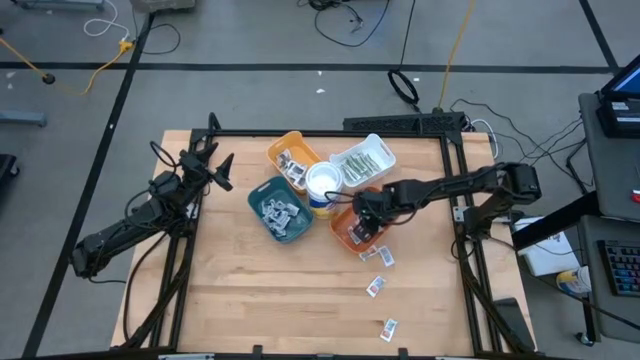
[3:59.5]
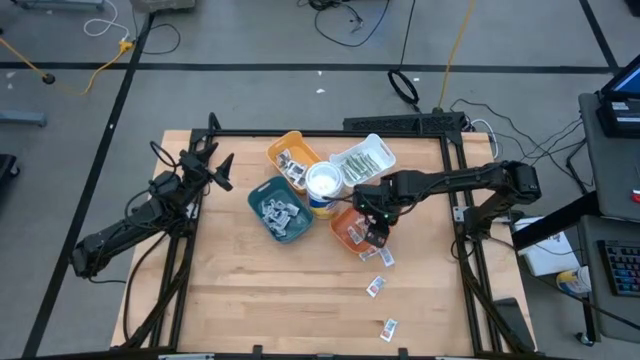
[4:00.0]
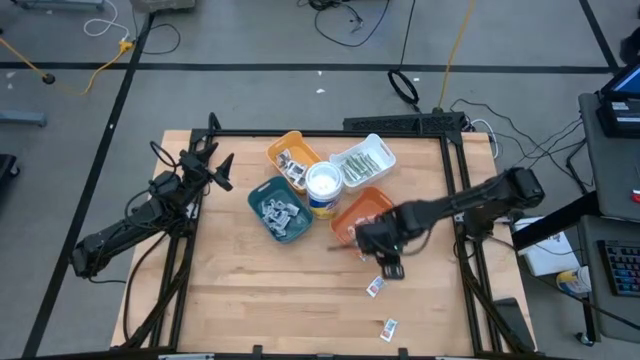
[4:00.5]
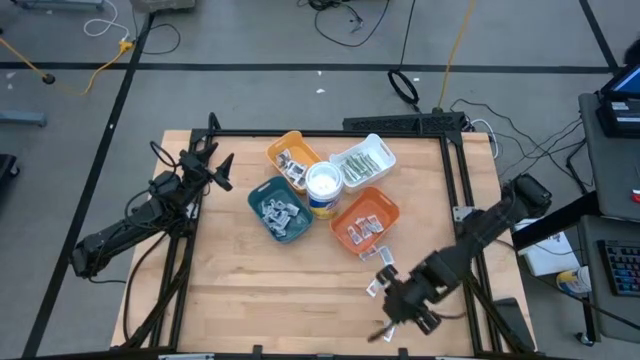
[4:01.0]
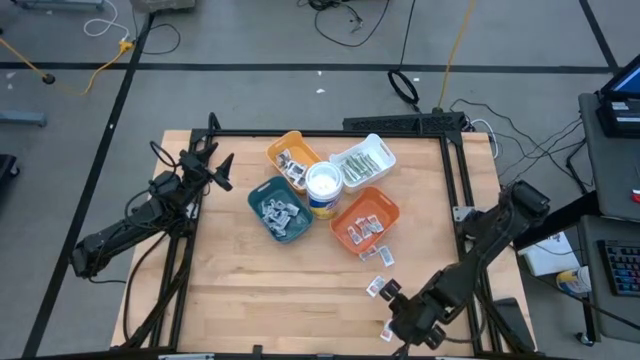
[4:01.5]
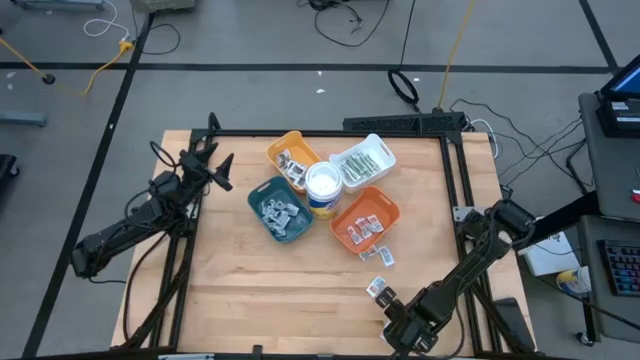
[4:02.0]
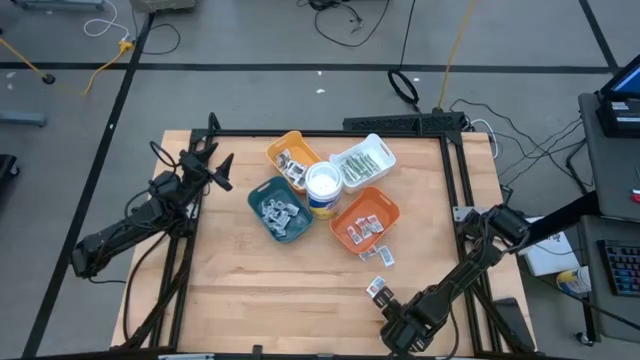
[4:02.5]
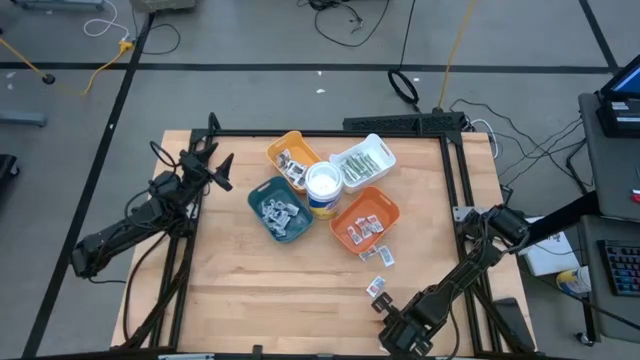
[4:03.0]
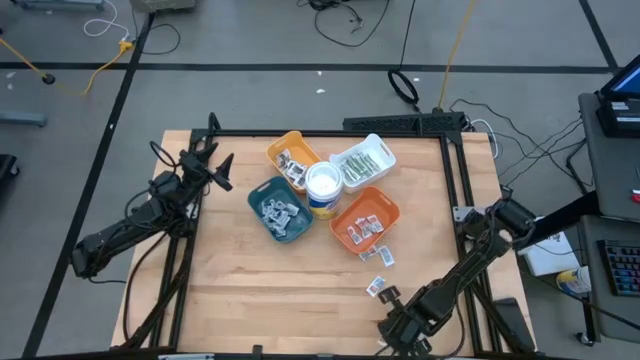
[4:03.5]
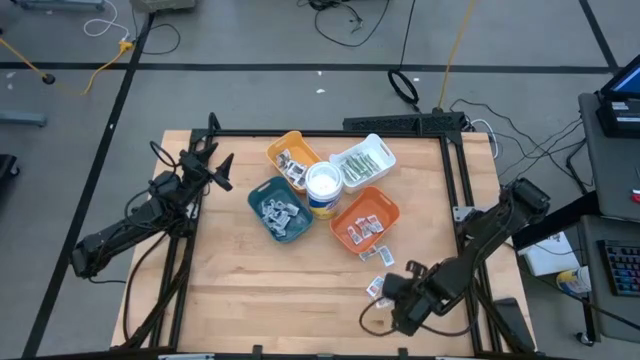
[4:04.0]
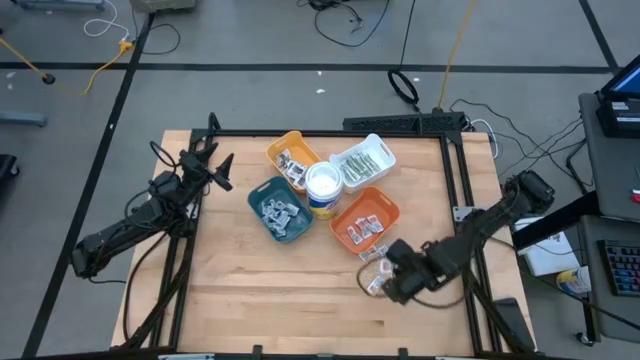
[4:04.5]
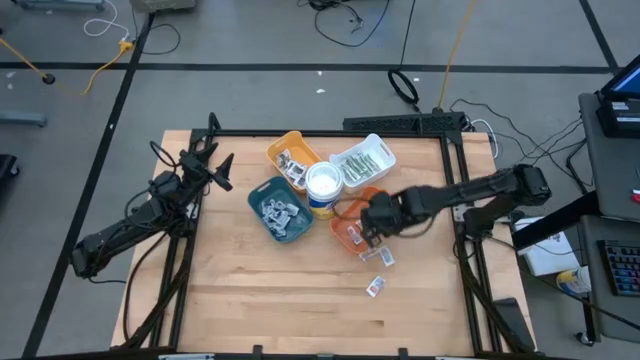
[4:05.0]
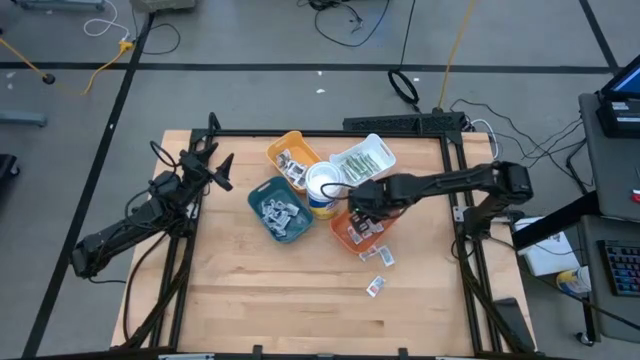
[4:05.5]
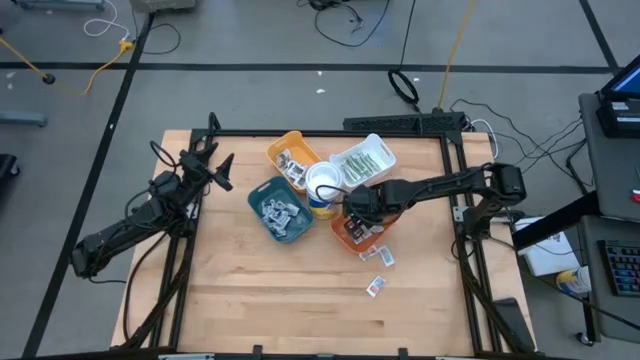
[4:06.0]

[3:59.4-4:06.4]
Task: Pick & Place First Aid Supplies
Put the orange pad into the orange bin

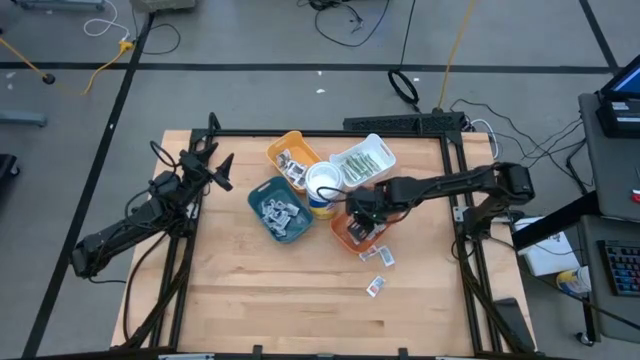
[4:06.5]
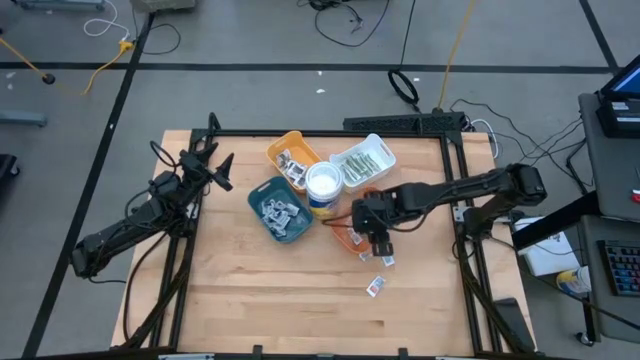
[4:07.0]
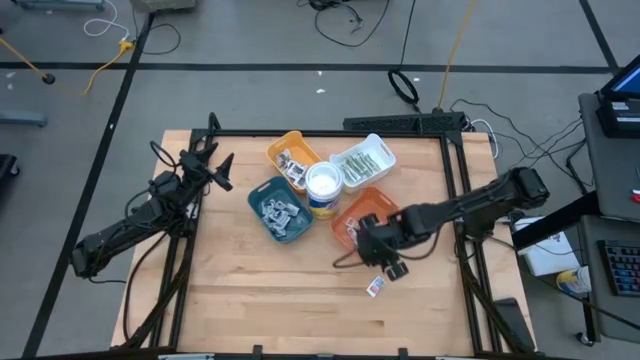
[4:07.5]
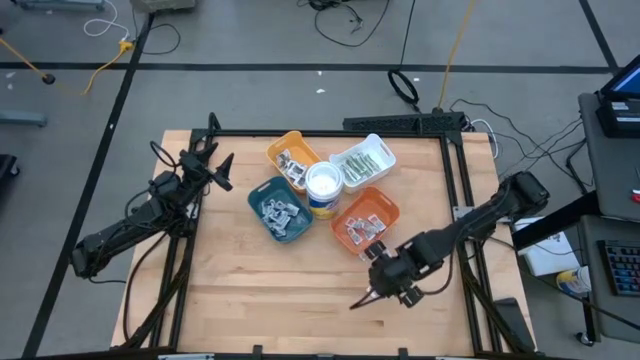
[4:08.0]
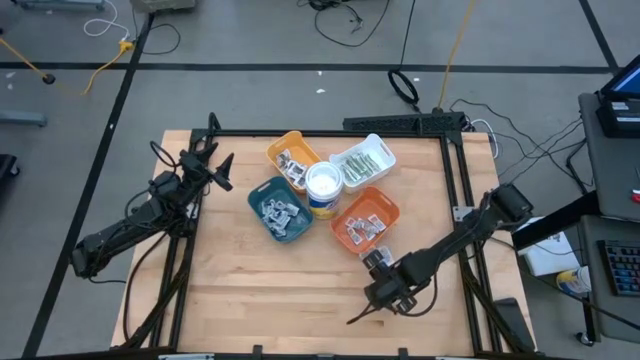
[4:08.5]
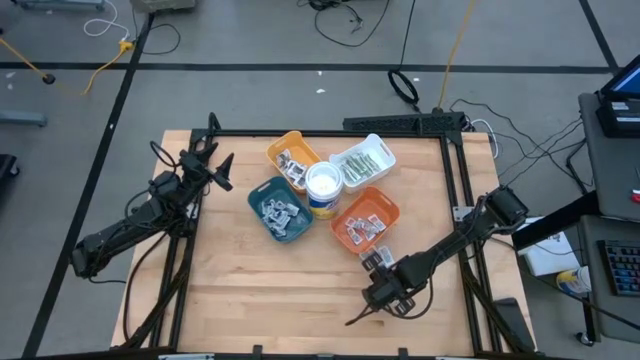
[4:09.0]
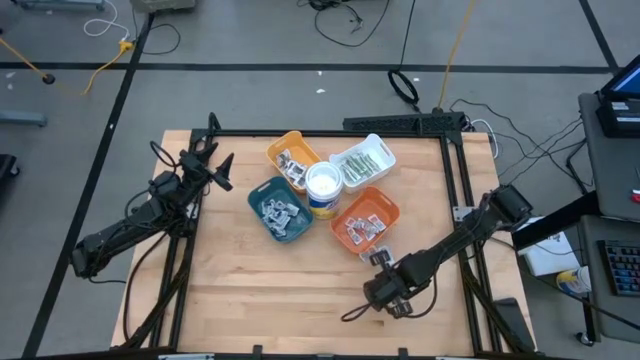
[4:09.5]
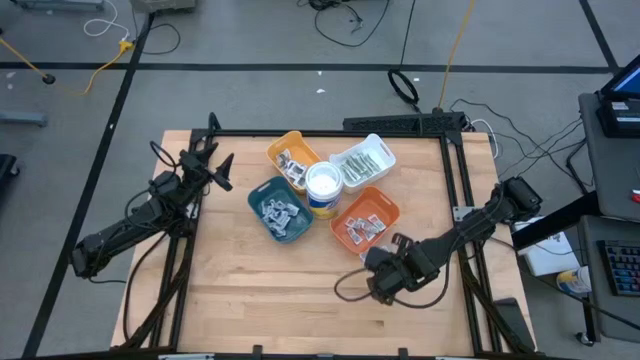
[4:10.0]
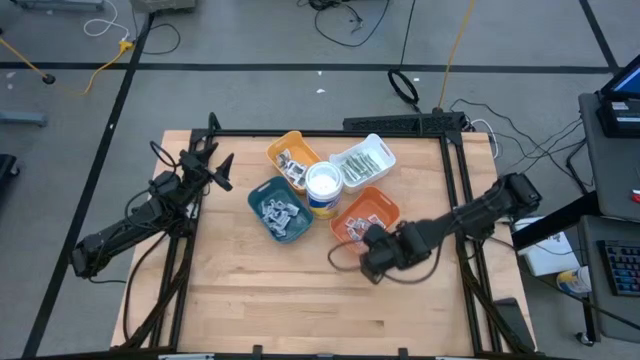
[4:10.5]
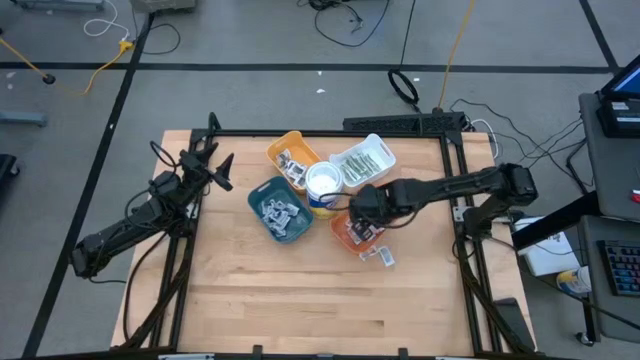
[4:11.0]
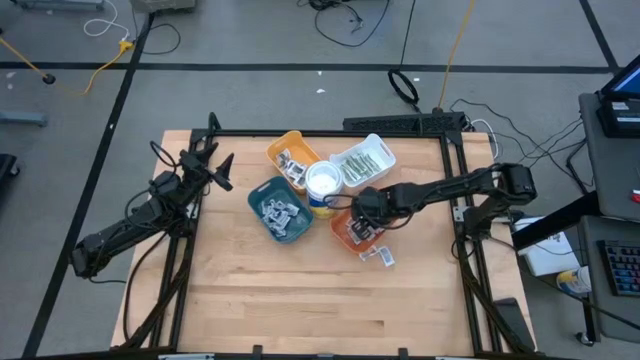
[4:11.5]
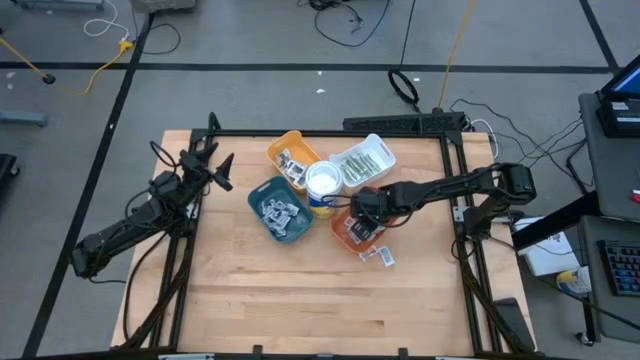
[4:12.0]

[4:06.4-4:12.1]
Put the orange pad into the orange bin

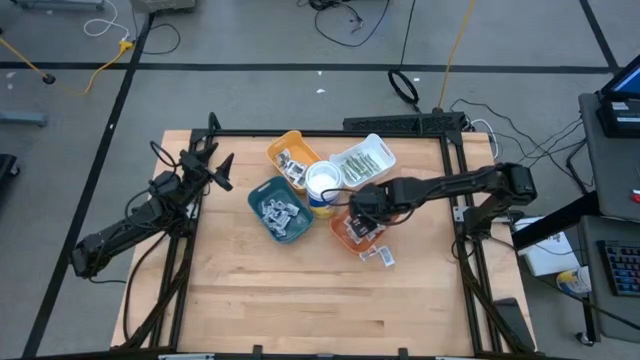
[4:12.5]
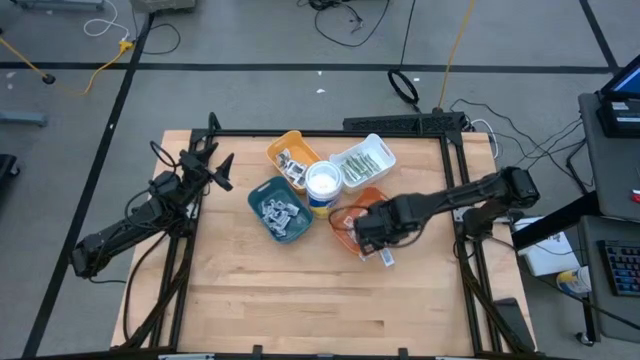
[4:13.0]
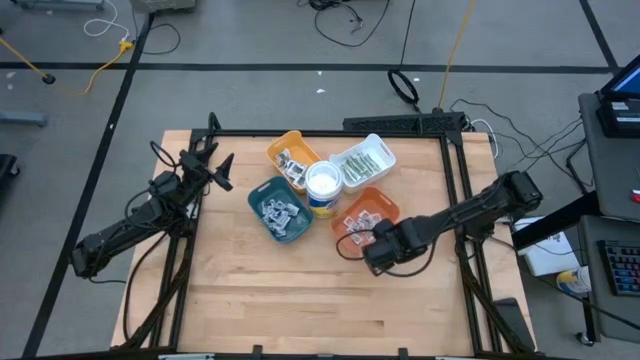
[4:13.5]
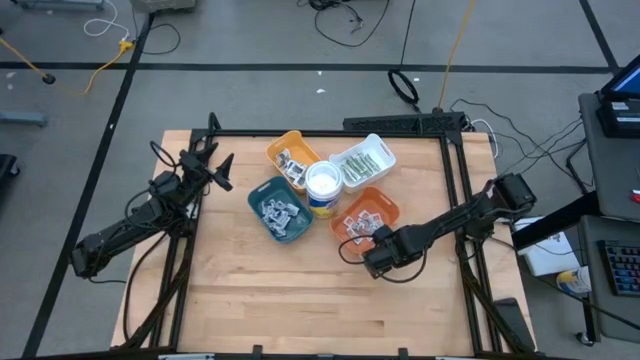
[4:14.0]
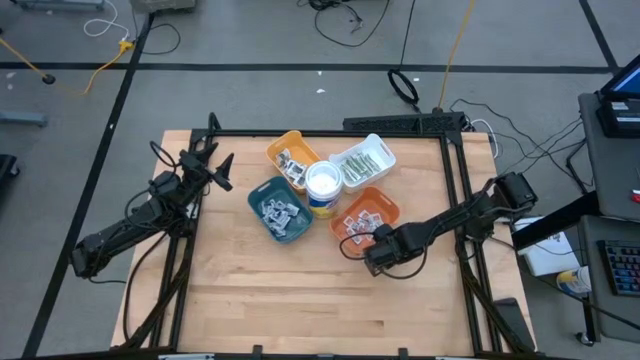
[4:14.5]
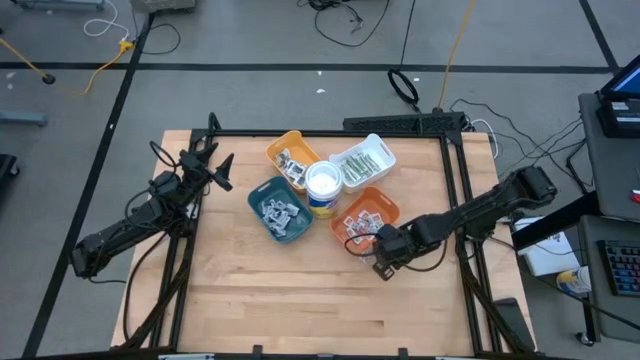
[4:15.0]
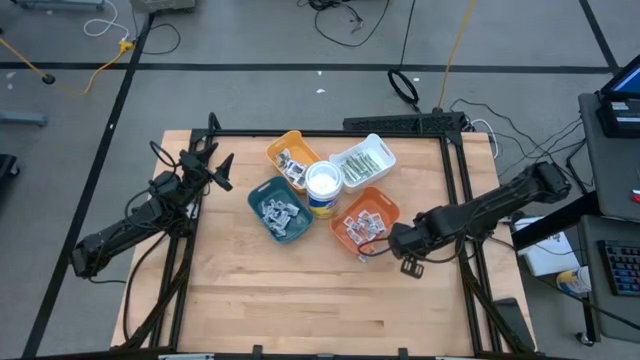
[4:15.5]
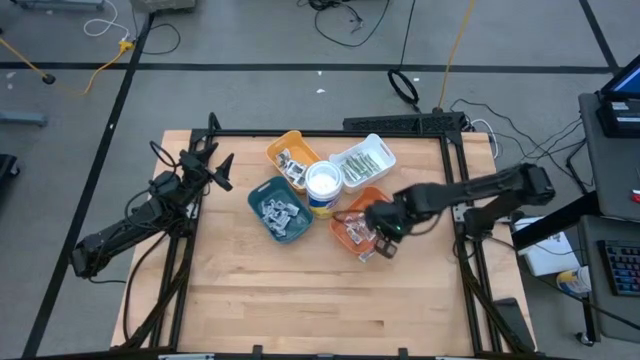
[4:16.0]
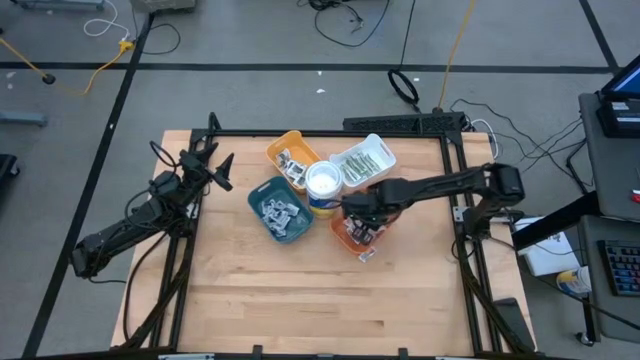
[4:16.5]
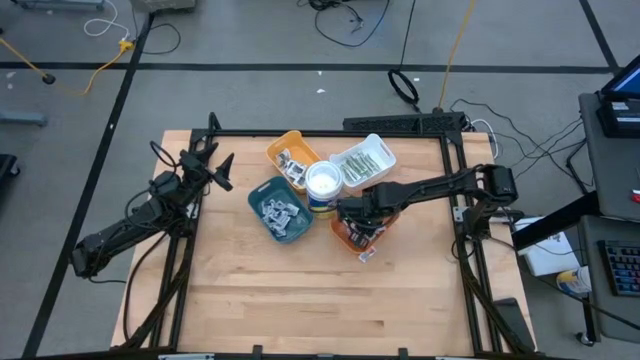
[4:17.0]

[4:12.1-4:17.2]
Put the orange pad into the orange bin

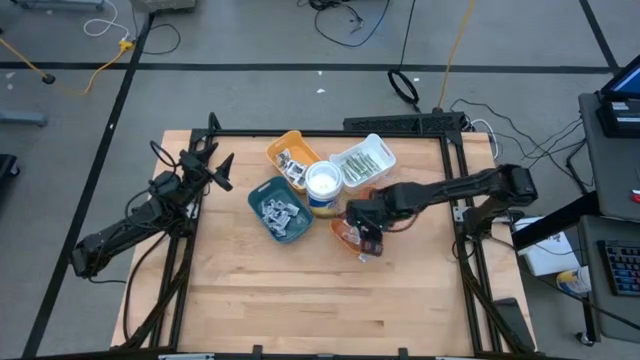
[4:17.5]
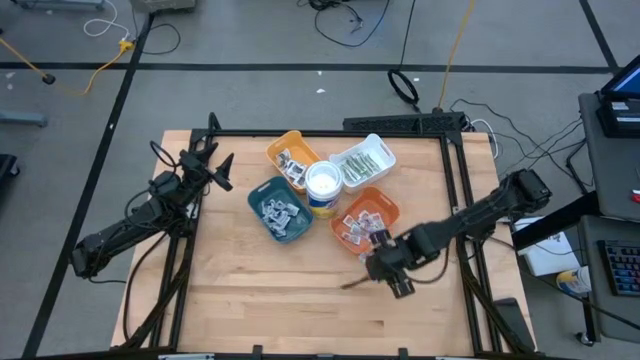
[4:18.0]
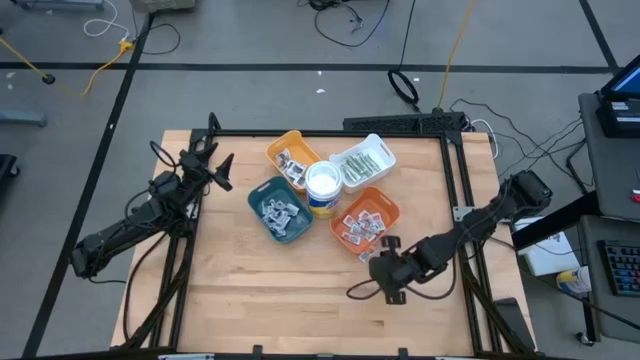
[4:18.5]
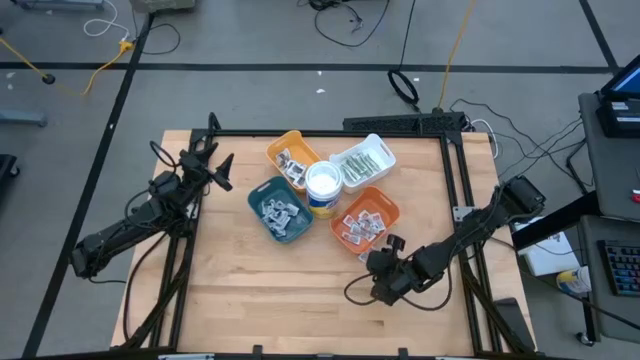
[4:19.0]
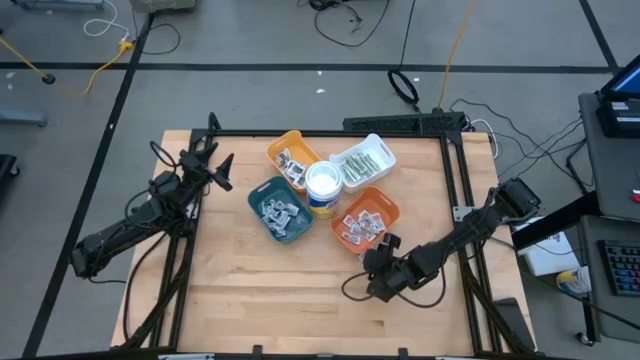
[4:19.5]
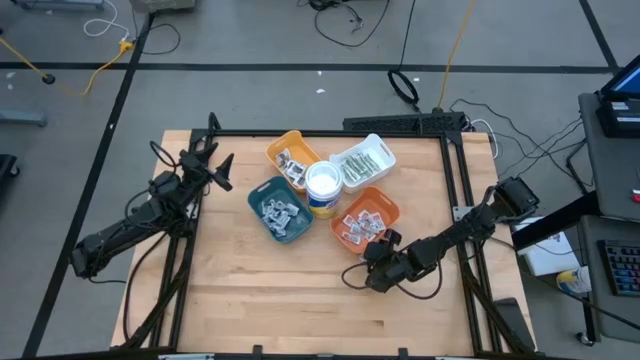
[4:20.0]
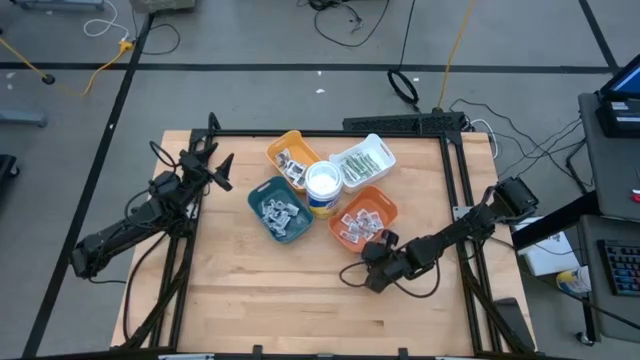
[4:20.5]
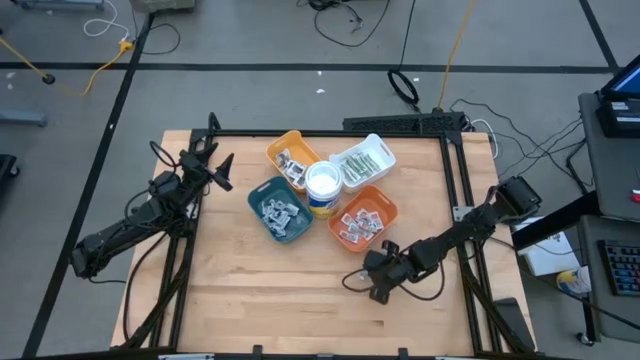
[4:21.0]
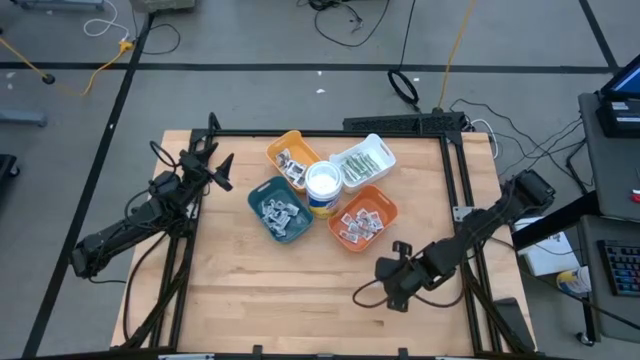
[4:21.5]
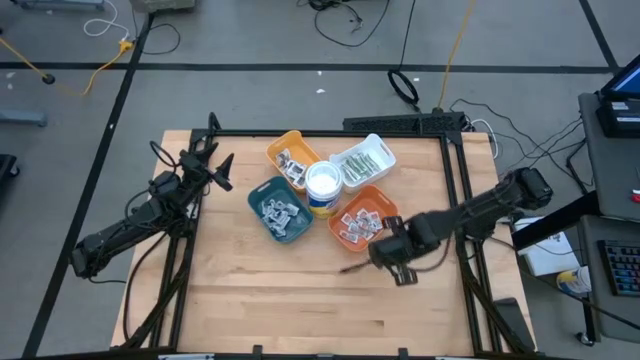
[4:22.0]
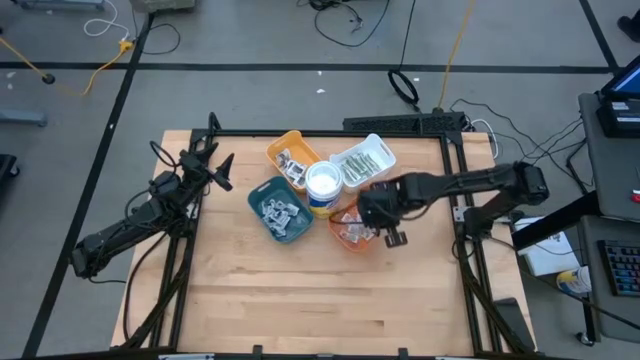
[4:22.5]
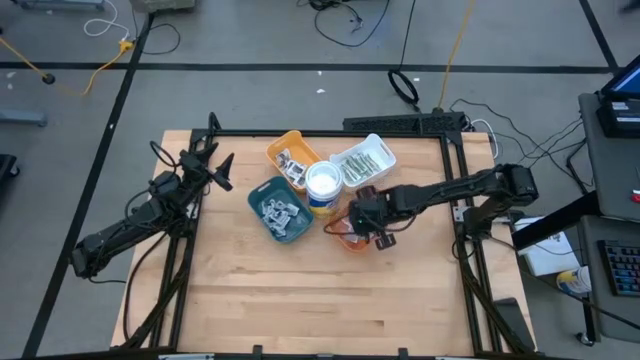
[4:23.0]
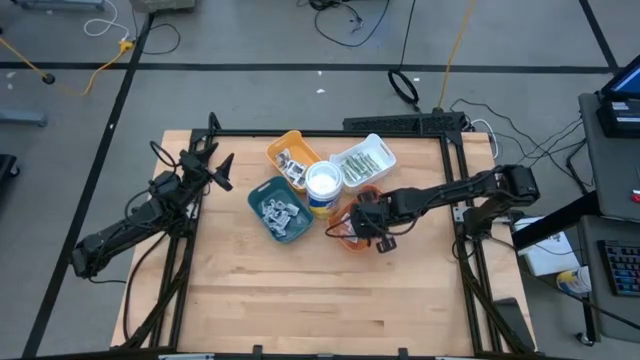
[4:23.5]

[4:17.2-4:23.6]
Put the orange pad into the orange bin
